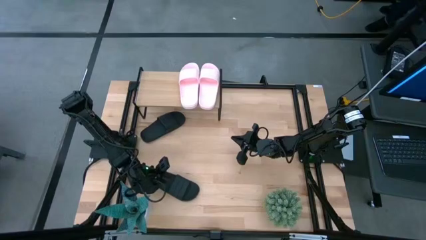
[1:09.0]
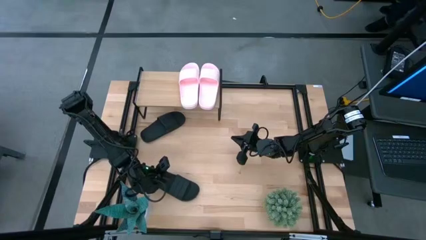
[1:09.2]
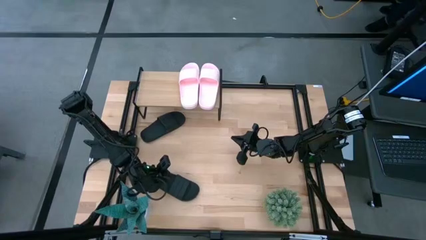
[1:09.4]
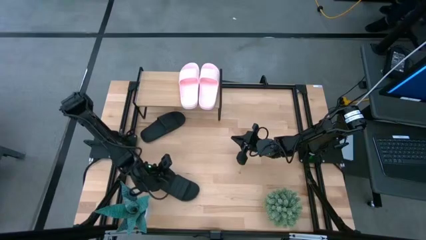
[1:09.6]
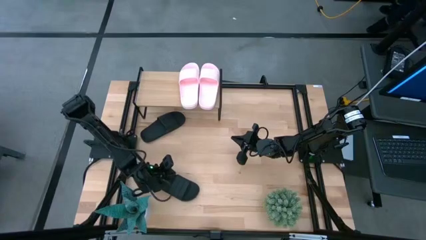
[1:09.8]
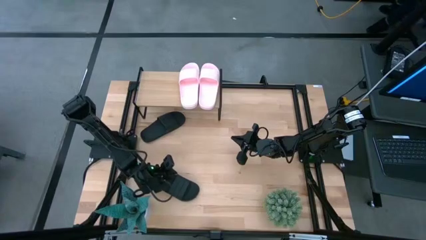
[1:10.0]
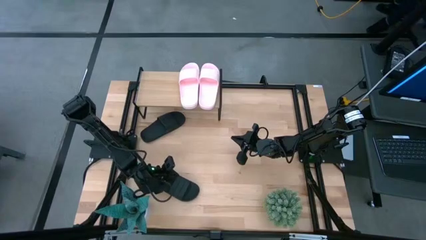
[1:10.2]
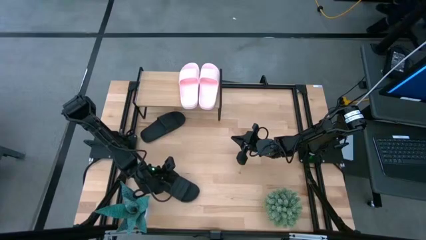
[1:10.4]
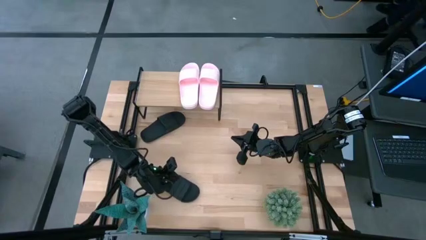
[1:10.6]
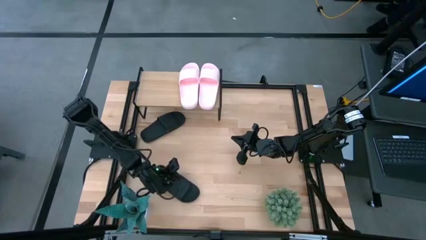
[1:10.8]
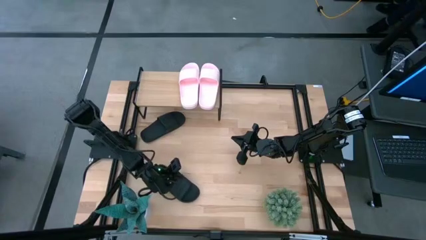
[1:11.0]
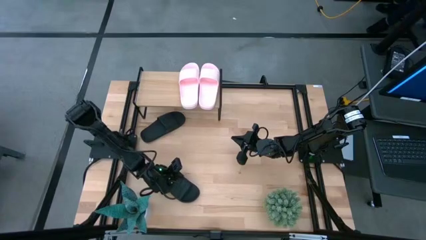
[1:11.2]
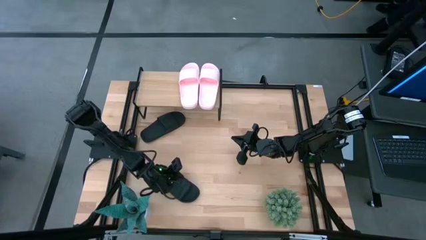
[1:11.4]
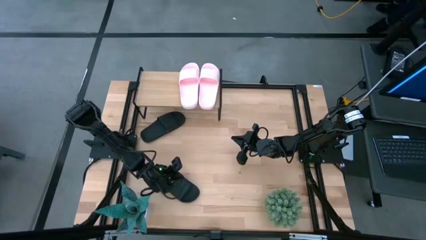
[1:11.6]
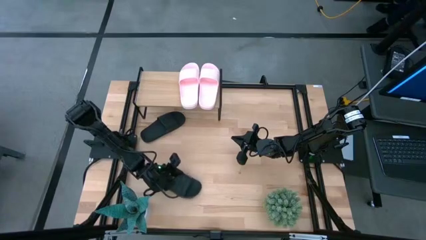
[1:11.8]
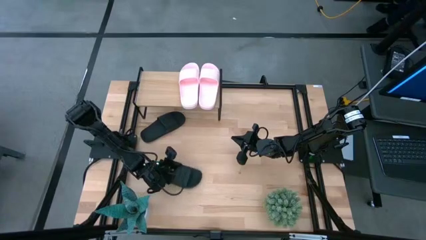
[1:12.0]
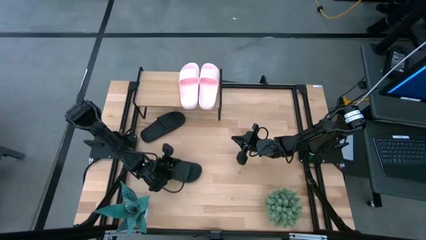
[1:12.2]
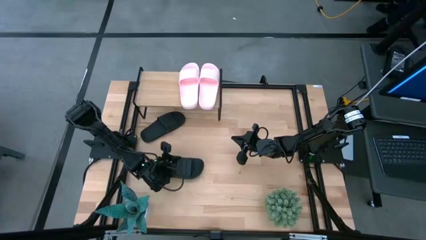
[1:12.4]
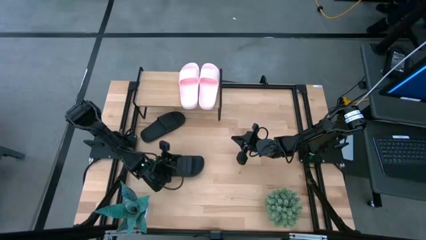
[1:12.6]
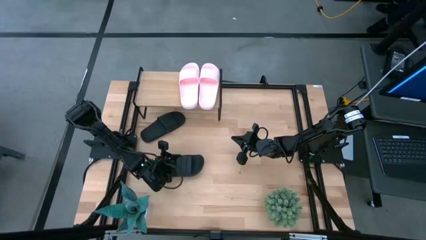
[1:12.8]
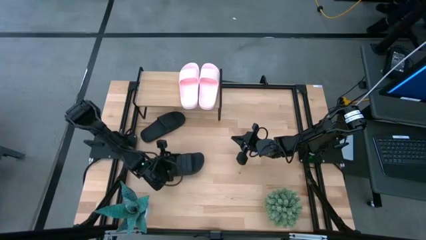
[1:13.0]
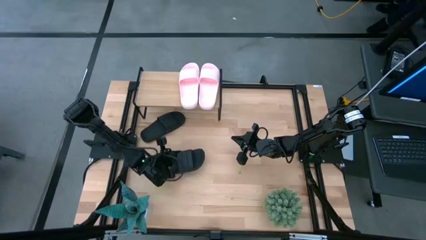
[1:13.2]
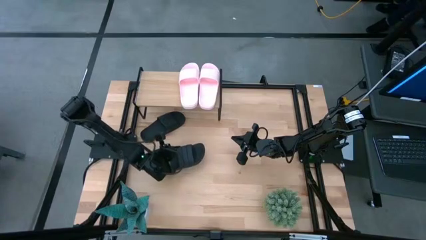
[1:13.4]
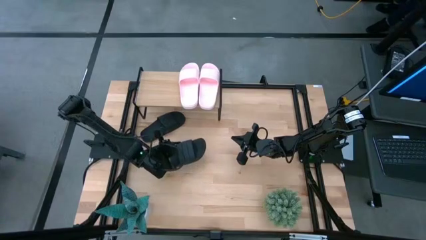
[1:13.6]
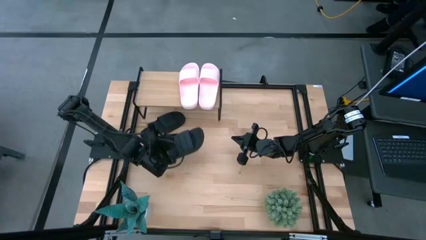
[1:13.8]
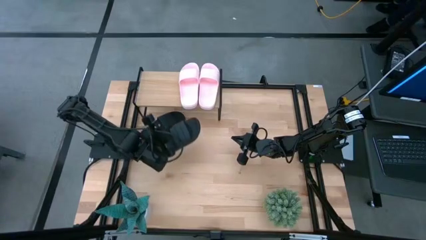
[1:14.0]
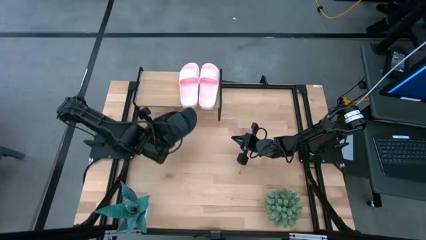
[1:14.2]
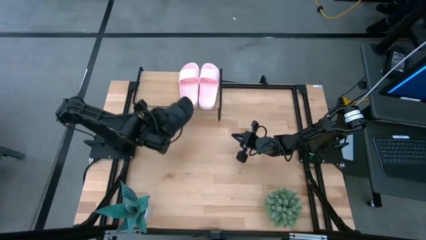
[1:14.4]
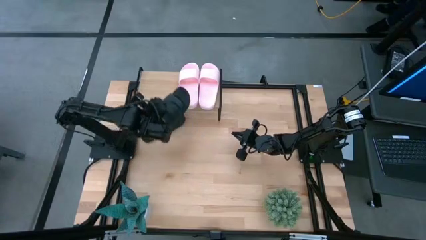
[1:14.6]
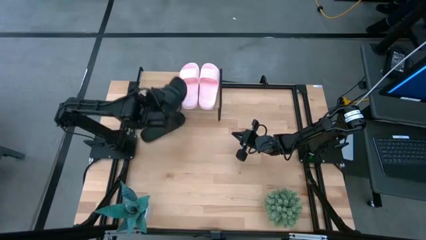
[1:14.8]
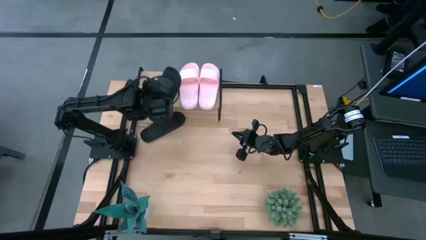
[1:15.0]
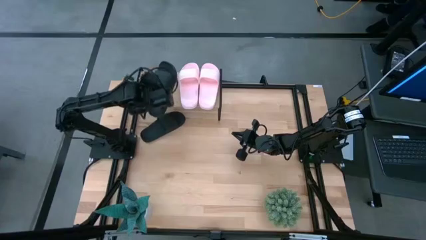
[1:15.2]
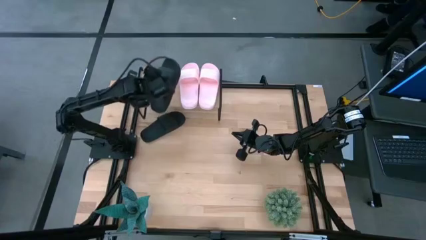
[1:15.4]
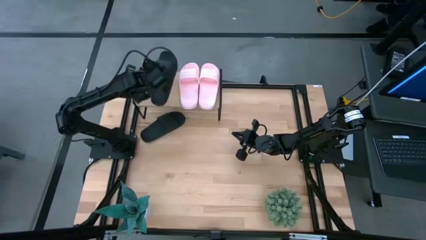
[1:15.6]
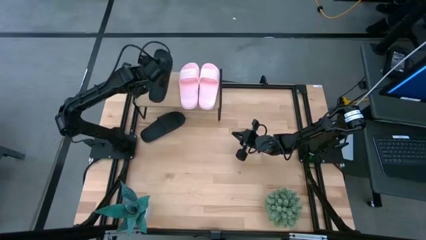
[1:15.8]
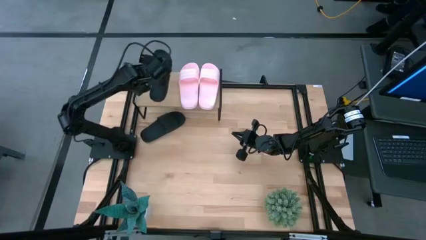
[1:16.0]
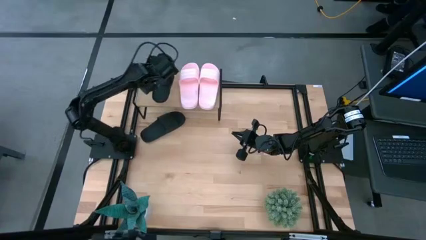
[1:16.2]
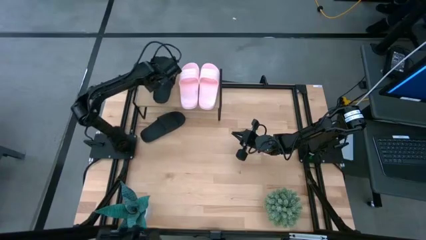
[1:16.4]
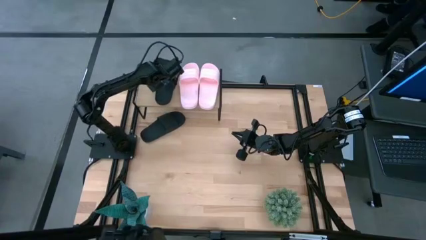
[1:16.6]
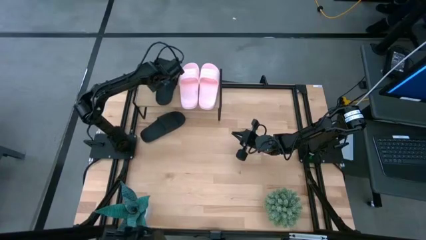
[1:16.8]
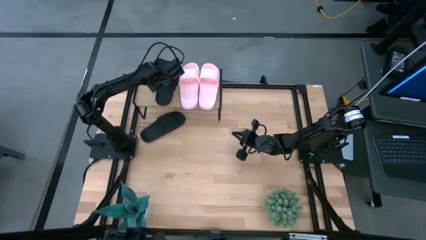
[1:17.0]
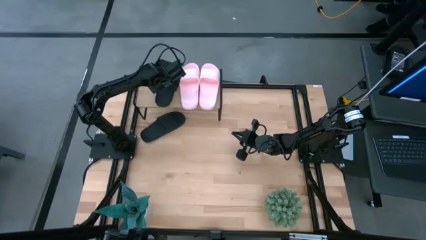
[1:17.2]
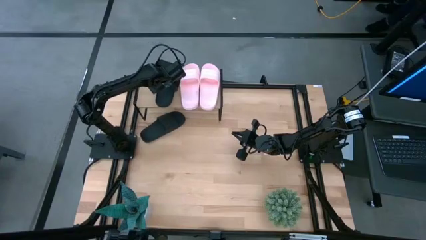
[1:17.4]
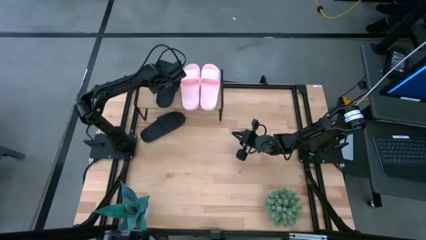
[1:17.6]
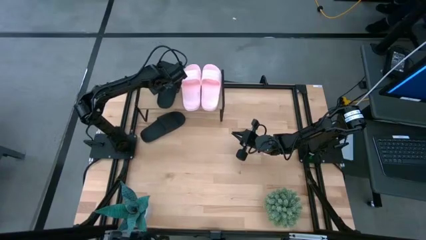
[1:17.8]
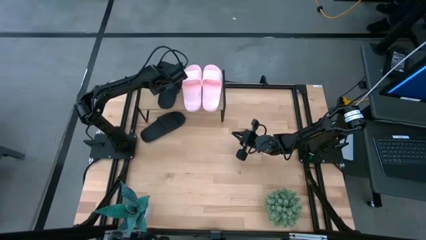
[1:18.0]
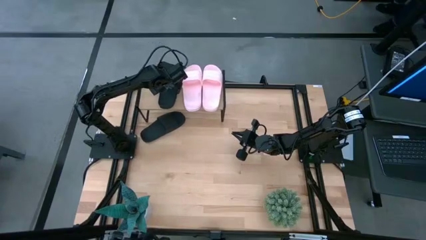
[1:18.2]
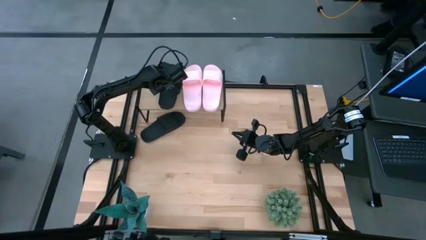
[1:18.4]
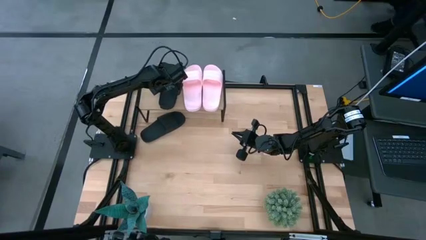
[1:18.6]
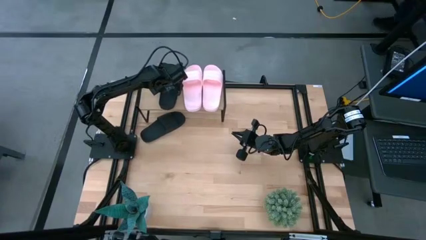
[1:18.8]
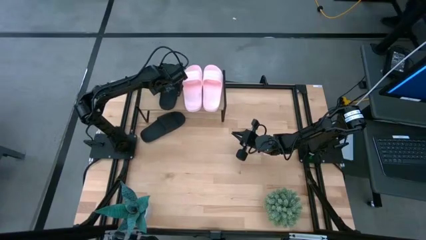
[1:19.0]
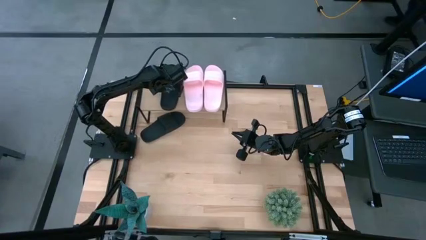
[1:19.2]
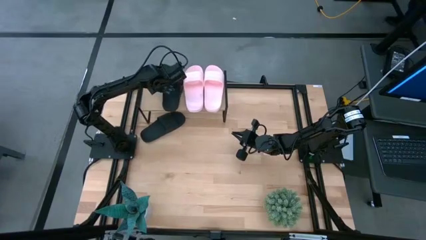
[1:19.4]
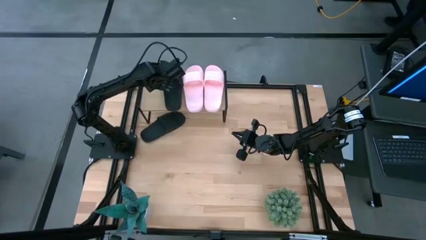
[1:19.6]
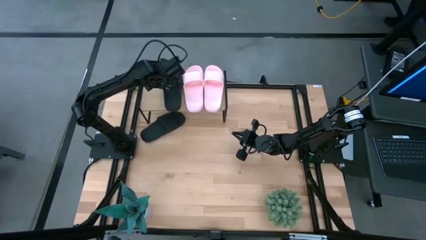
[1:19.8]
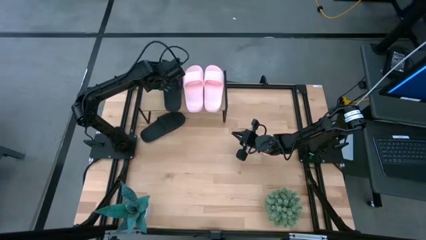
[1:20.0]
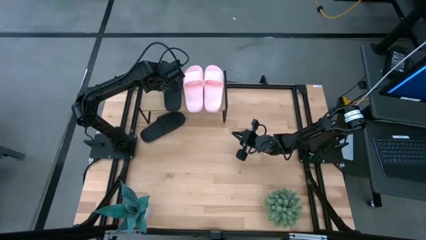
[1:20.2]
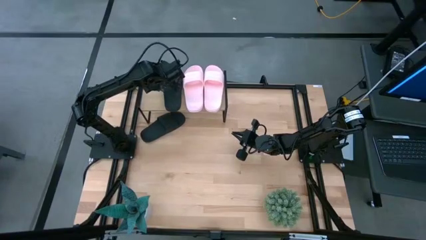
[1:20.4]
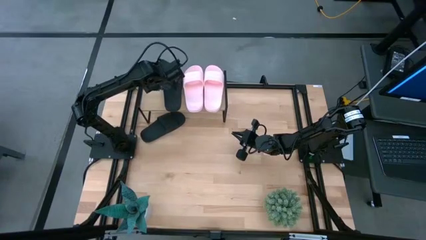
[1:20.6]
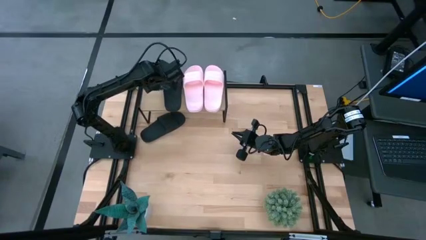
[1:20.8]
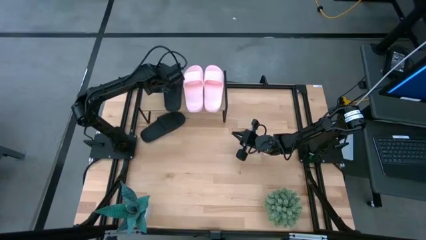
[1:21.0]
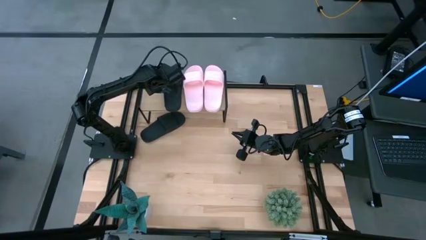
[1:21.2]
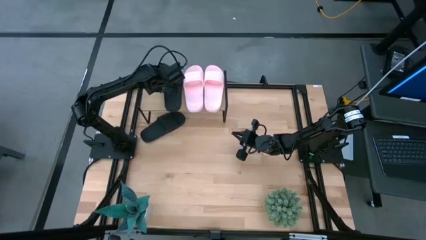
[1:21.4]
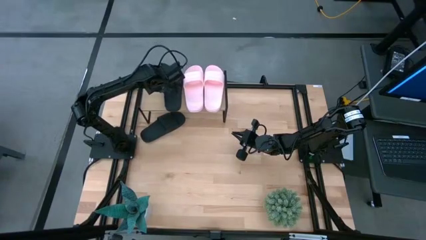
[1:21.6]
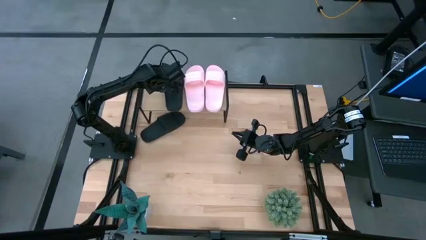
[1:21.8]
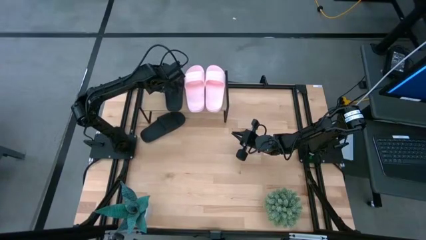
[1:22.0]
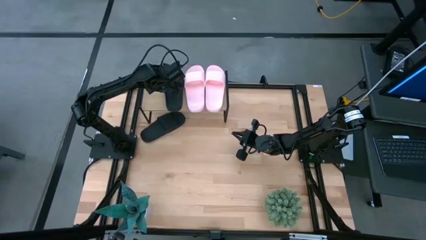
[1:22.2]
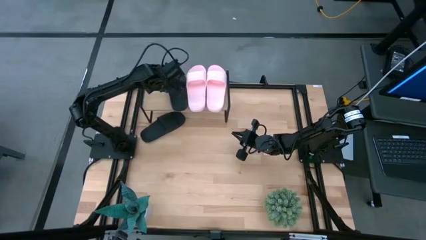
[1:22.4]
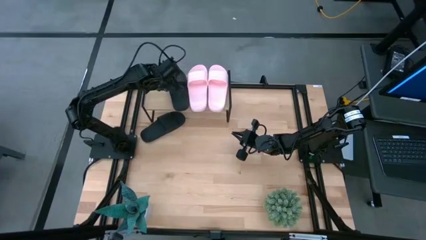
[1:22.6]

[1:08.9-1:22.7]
Task: Pick and place slides into the shelf
Put the bottom black slide on the shelf
